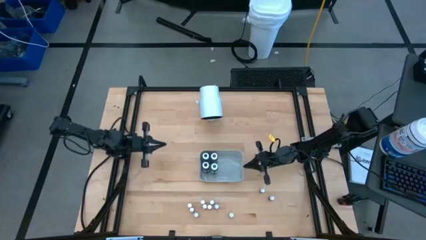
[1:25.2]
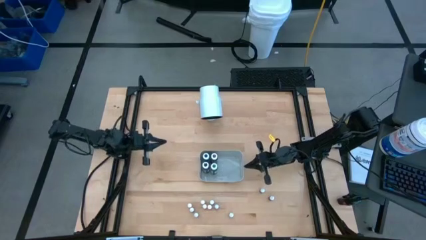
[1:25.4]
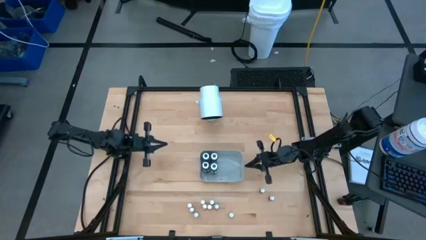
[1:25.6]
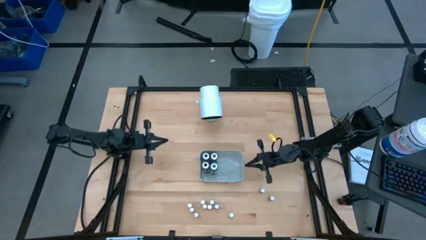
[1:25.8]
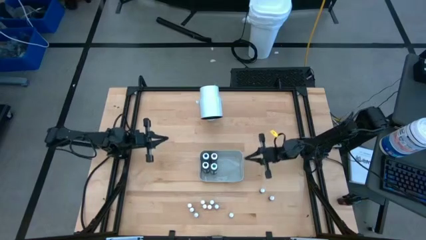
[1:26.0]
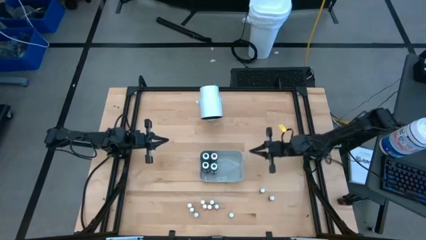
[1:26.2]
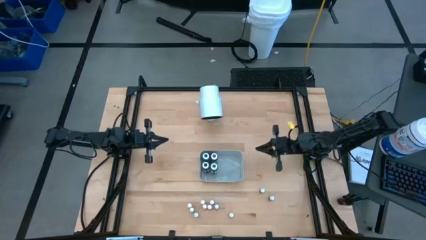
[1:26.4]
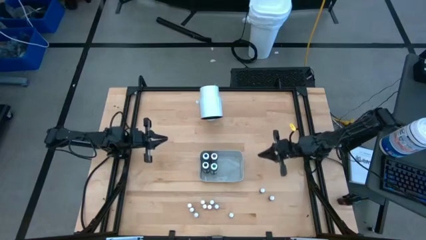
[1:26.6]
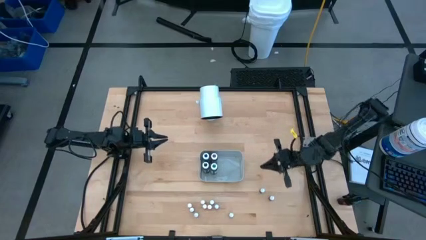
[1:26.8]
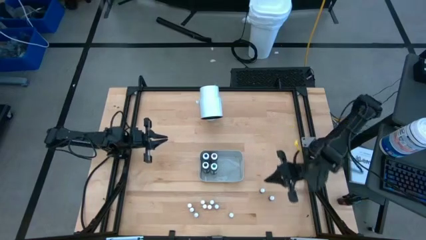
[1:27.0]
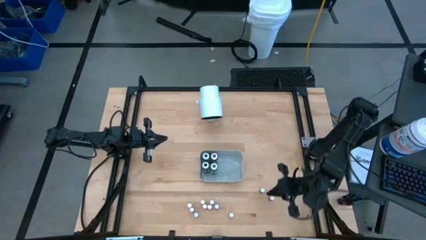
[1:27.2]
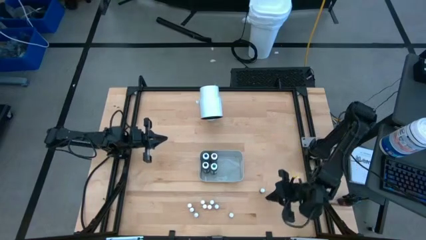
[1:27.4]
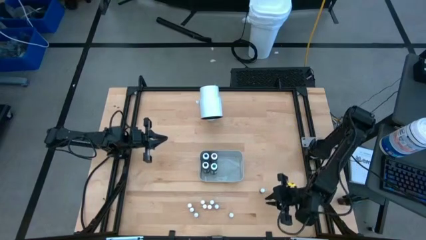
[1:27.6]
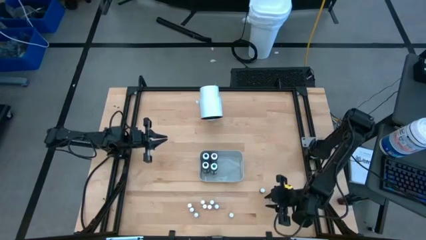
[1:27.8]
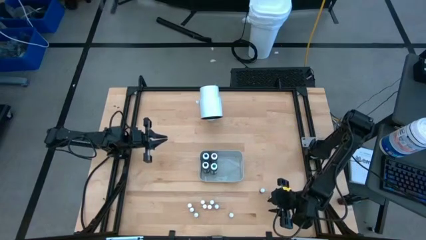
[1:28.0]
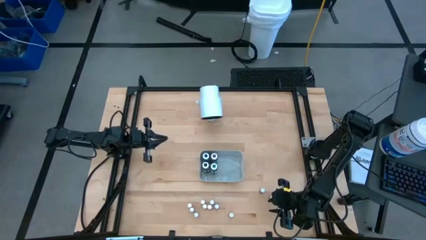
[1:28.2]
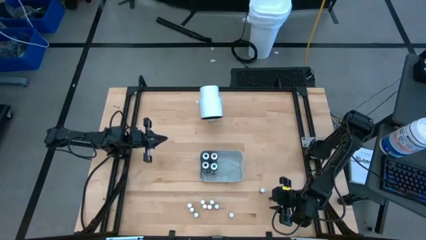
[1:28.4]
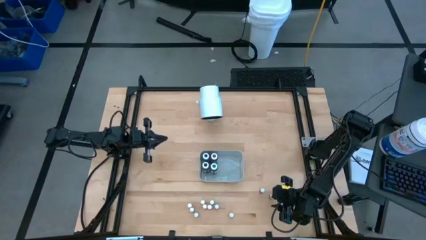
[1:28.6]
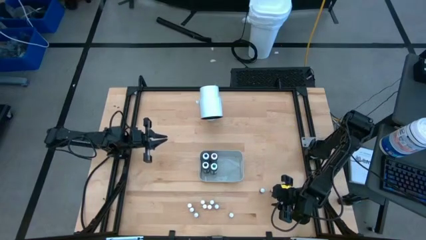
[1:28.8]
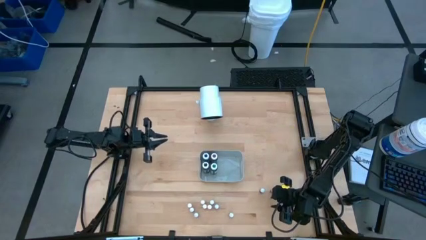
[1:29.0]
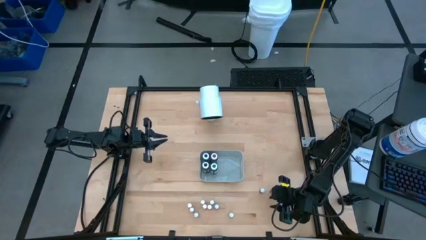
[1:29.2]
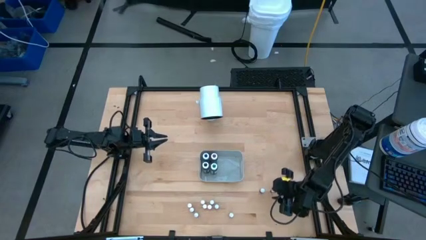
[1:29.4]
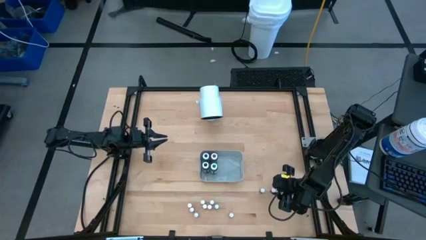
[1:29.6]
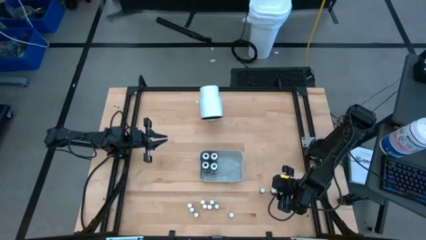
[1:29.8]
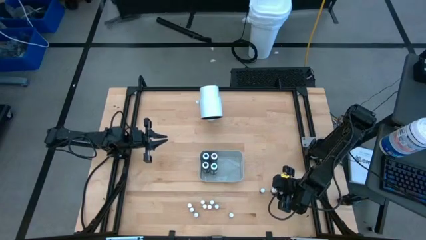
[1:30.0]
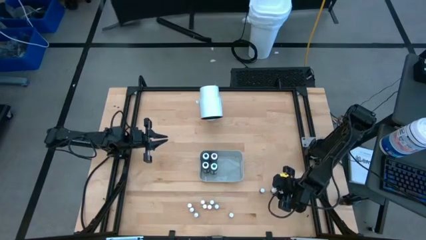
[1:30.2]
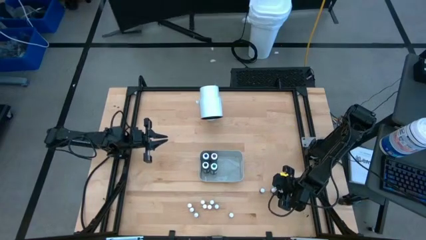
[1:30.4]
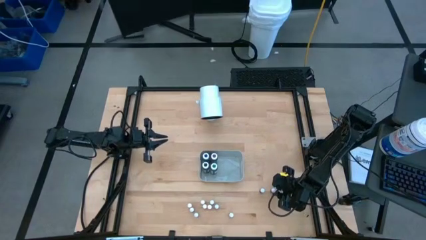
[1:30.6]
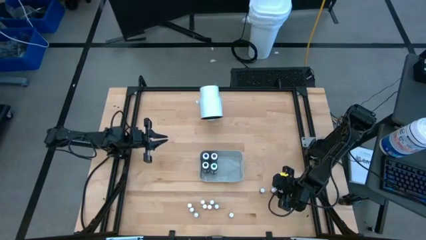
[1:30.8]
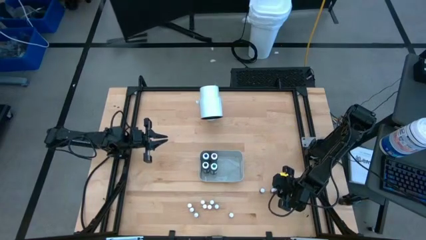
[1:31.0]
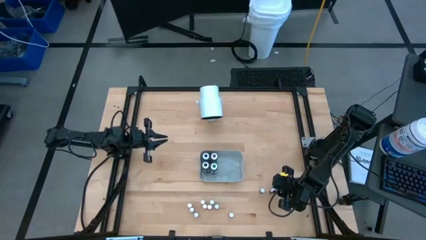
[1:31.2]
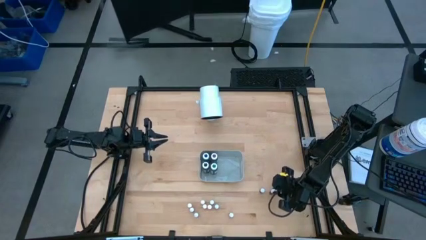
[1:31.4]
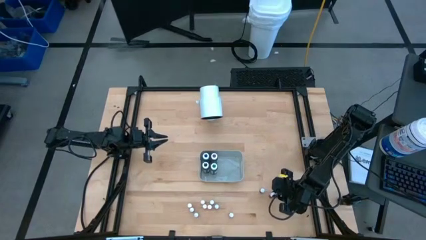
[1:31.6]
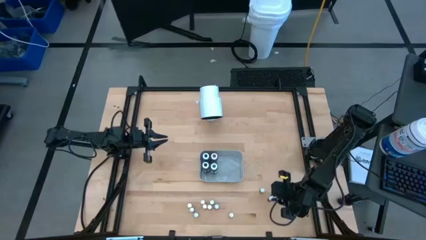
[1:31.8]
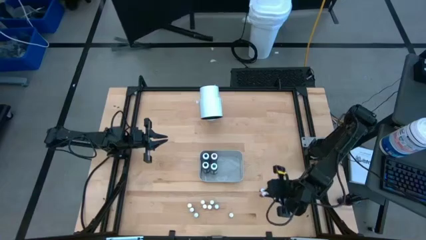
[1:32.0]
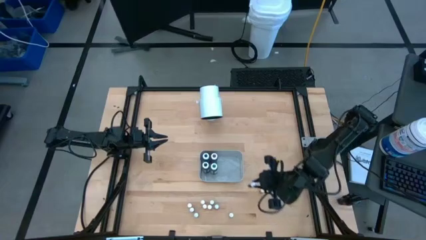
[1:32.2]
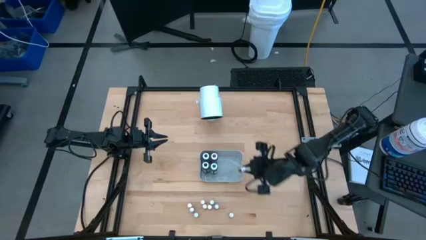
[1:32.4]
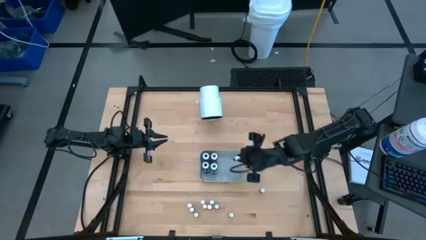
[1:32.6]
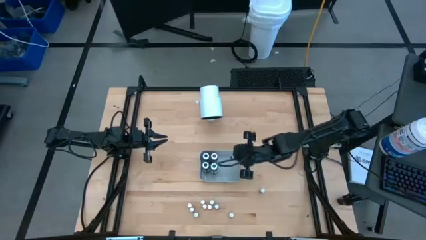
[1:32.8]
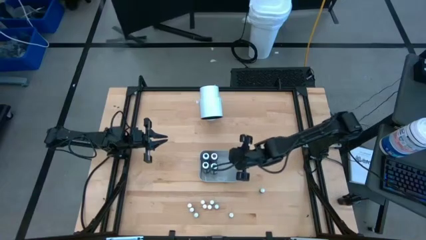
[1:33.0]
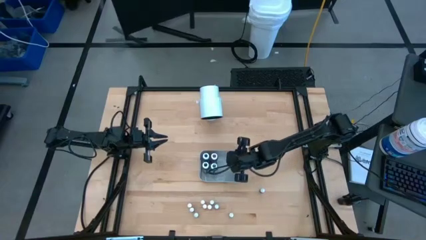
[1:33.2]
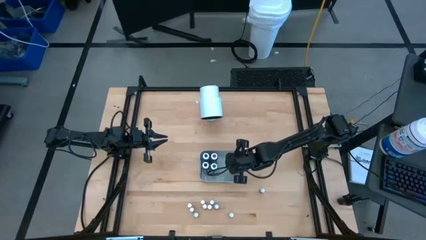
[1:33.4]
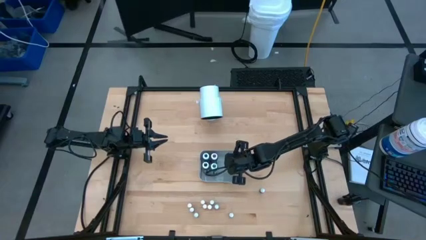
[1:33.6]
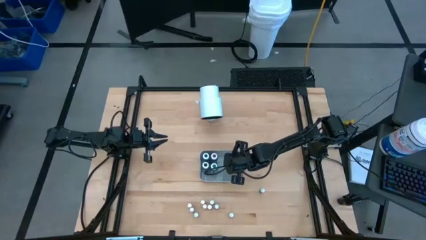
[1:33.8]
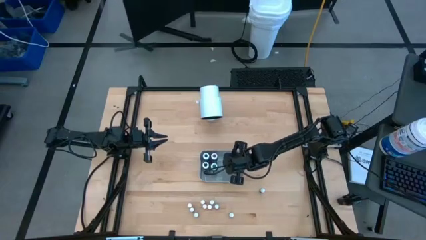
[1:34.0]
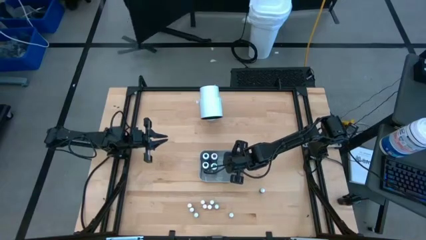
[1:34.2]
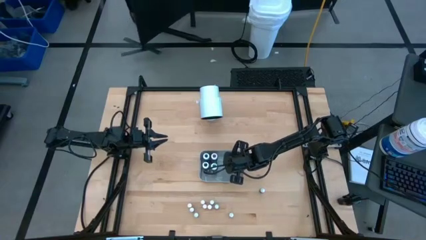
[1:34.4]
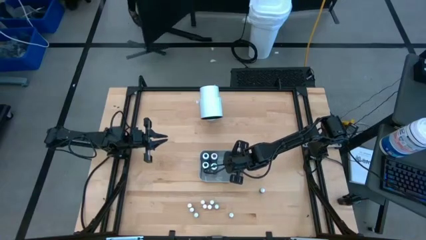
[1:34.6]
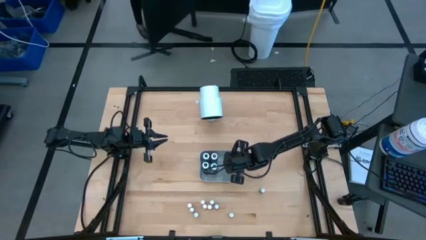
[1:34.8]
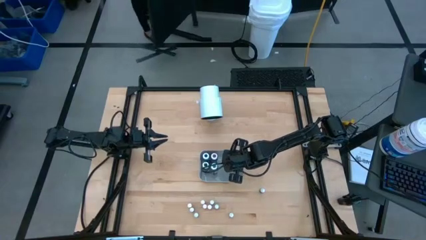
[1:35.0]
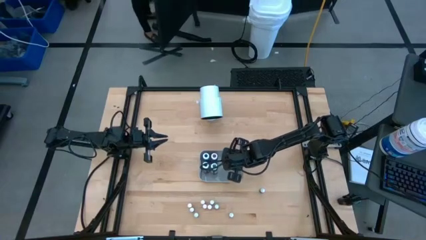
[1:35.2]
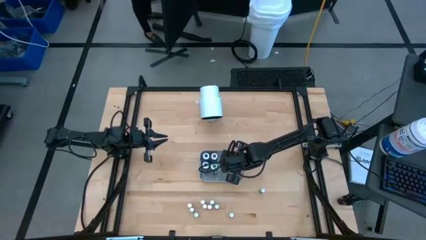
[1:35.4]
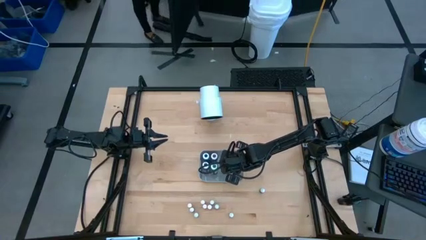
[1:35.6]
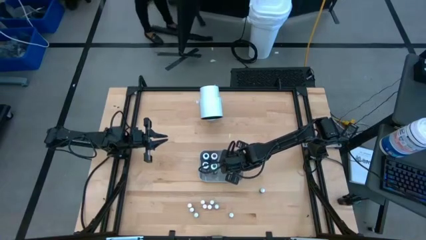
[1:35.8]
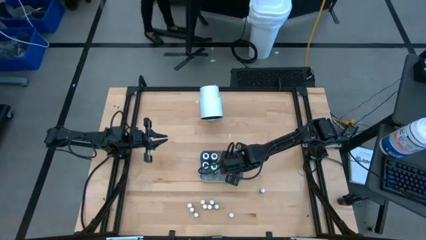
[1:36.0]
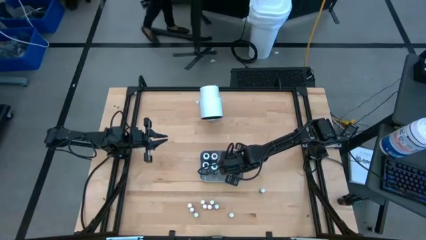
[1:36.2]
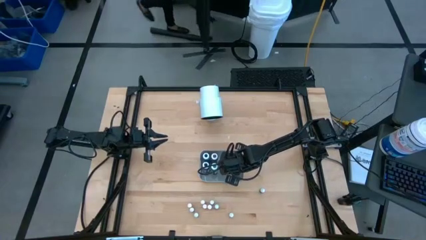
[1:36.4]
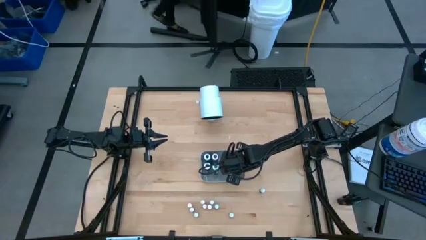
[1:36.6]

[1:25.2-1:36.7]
Task: Pick & Place food coloring
Put the small purple food coloring bottle into the gray bin

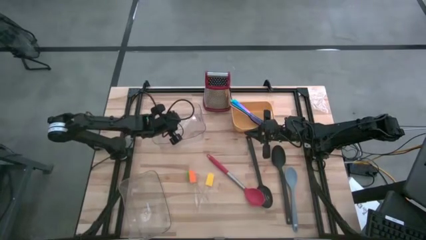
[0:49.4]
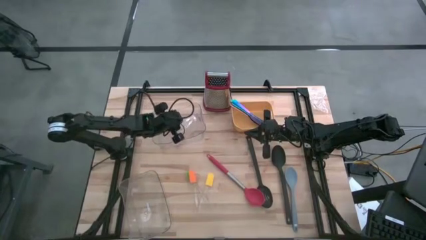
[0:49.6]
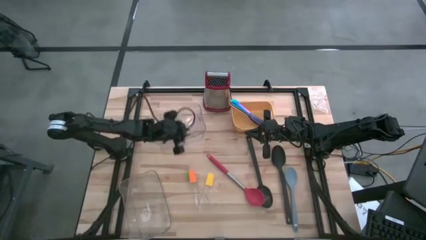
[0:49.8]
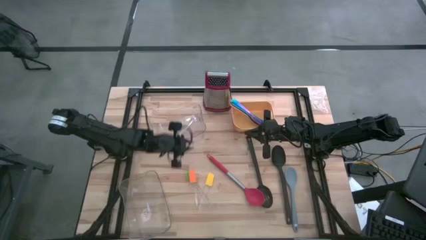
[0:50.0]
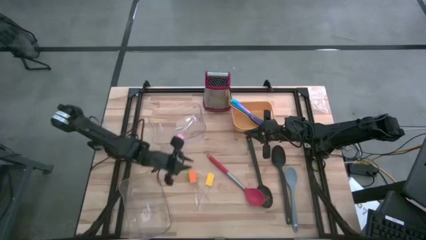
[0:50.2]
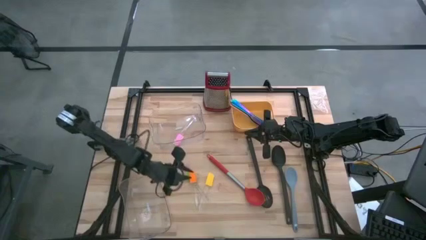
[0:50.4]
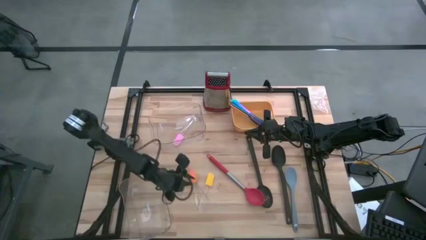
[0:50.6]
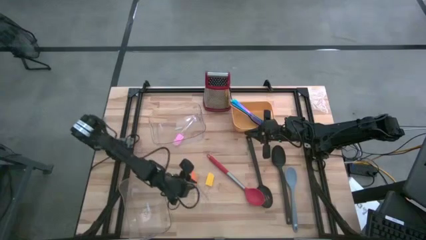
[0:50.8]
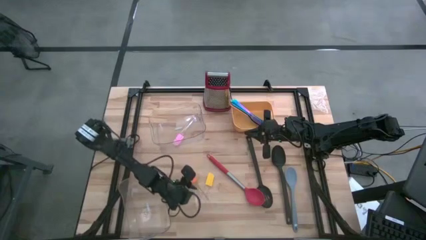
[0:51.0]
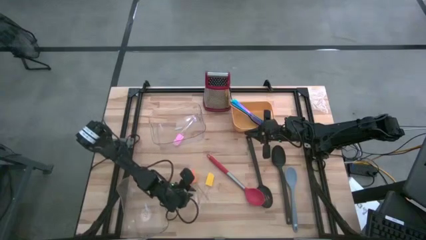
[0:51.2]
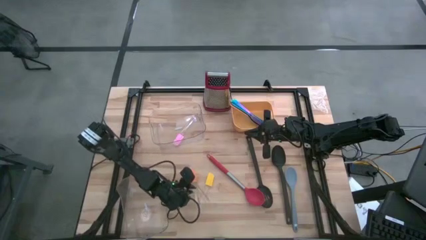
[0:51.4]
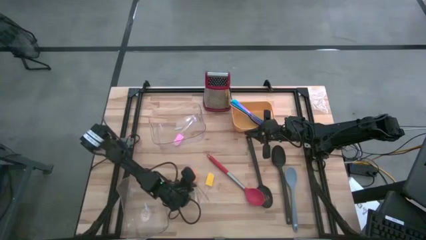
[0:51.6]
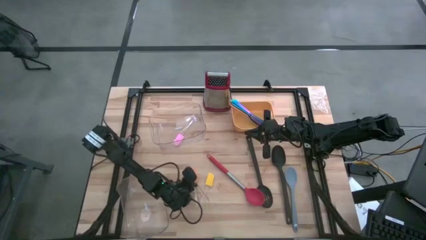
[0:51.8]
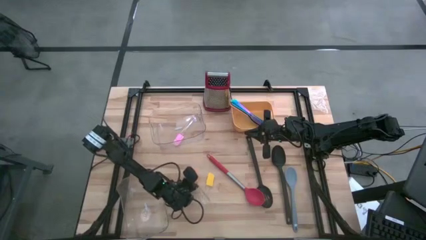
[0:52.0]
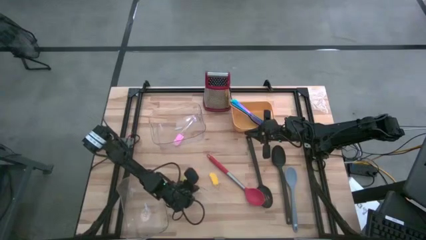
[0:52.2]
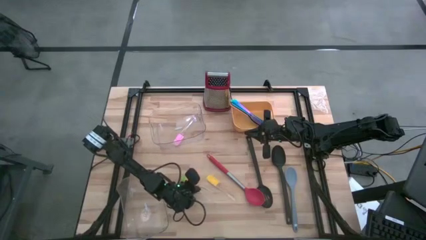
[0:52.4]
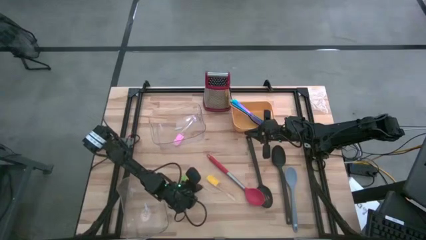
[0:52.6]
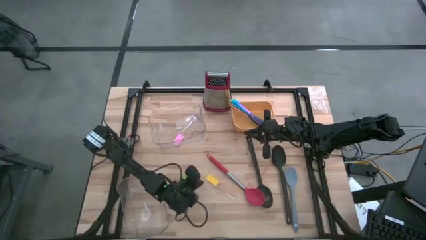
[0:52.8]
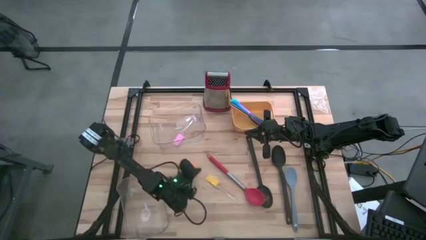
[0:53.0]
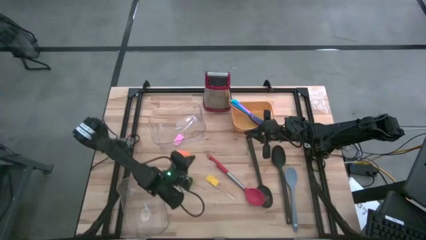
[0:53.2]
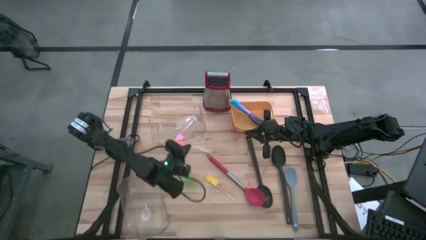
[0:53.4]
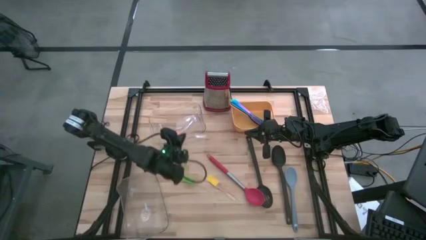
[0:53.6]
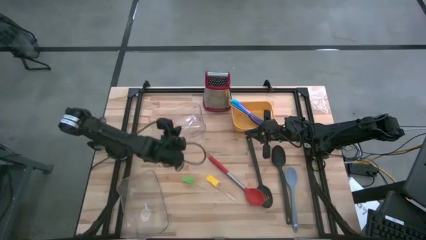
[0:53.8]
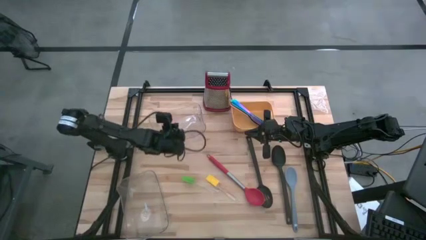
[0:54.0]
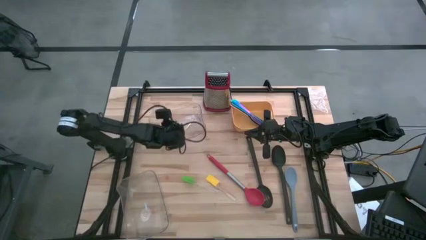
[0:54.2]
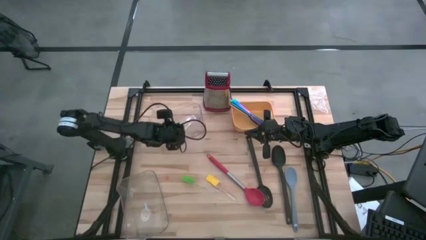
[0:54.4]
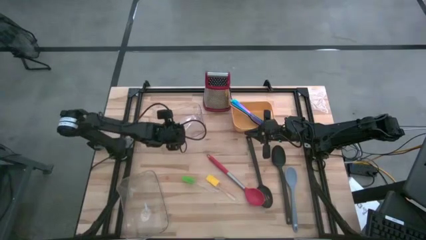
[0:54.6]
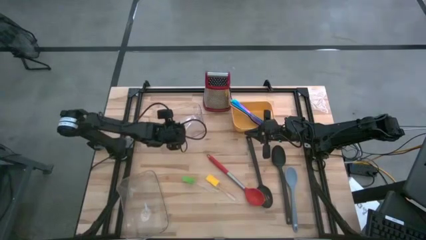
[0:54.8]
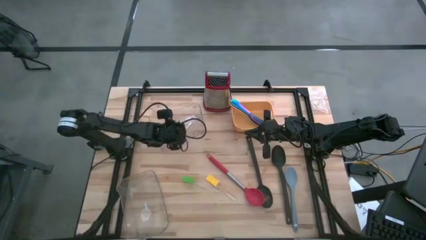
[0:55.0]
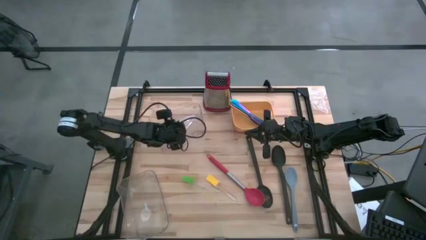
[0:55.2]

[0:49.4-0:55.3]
Task: Pick & Place Kitchen Items
Put the orange spatula into the top transparent bin
